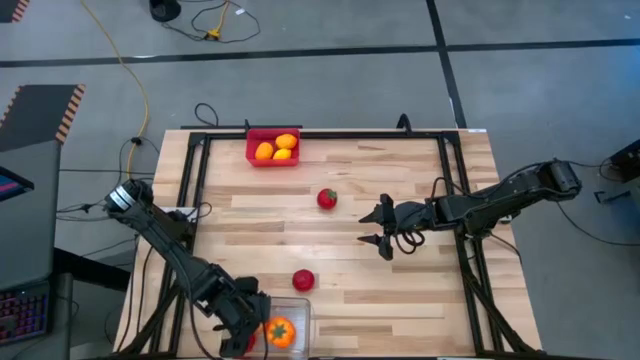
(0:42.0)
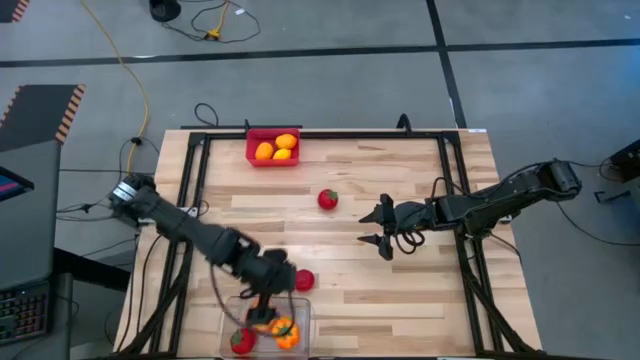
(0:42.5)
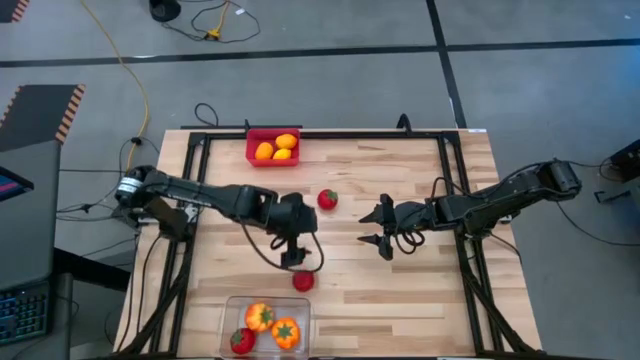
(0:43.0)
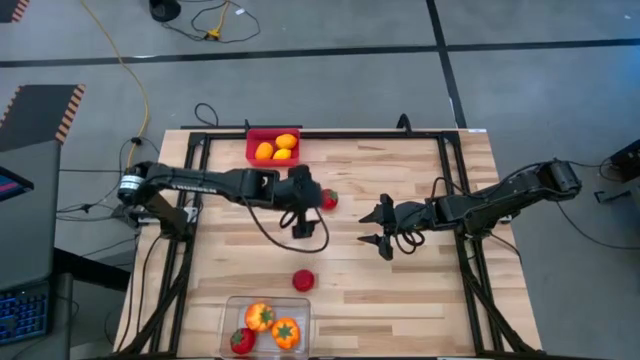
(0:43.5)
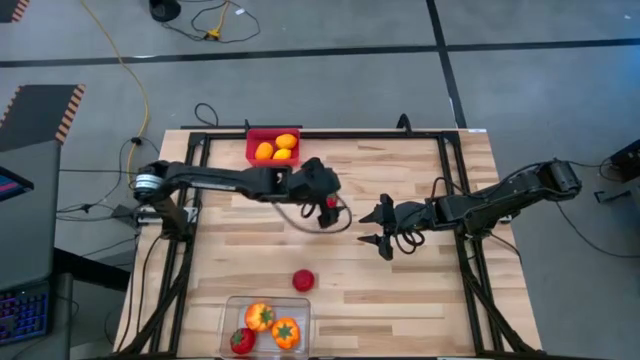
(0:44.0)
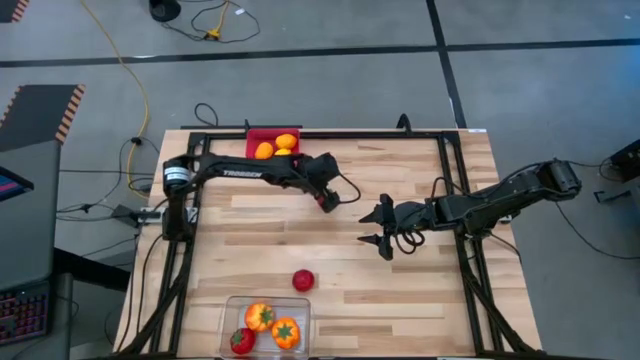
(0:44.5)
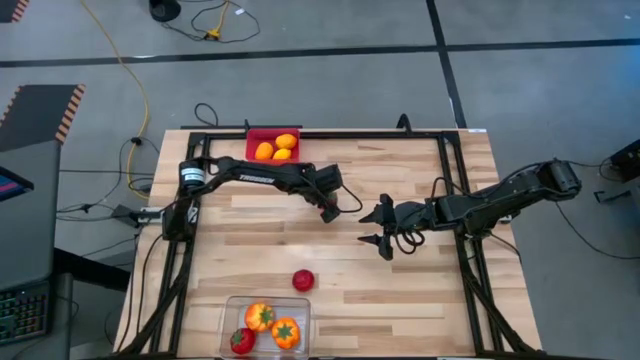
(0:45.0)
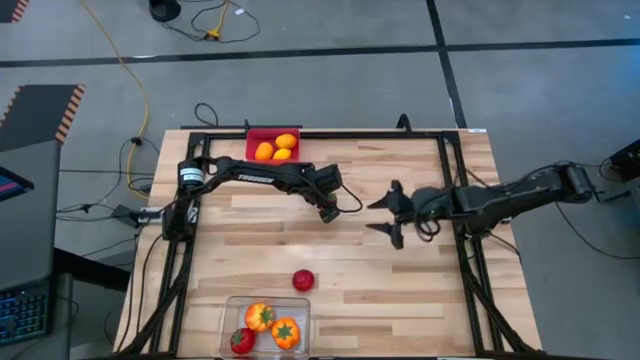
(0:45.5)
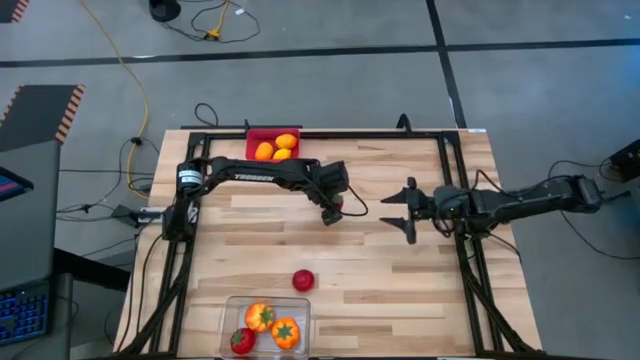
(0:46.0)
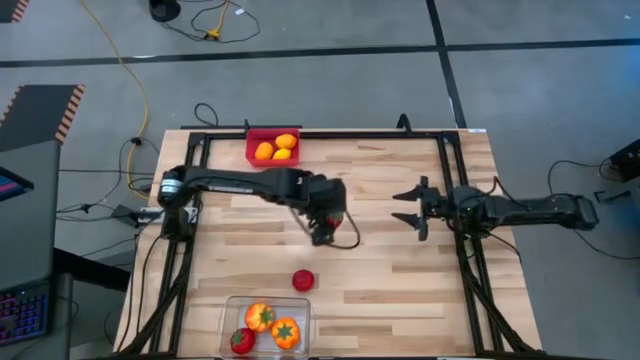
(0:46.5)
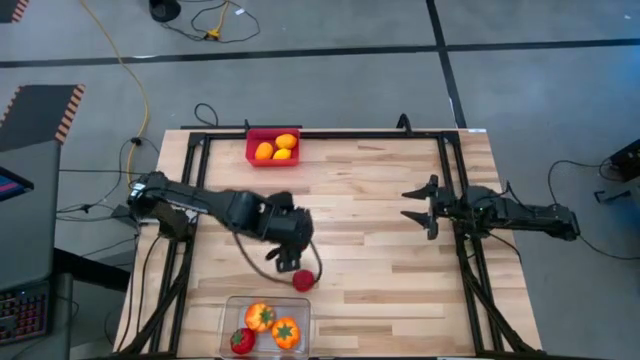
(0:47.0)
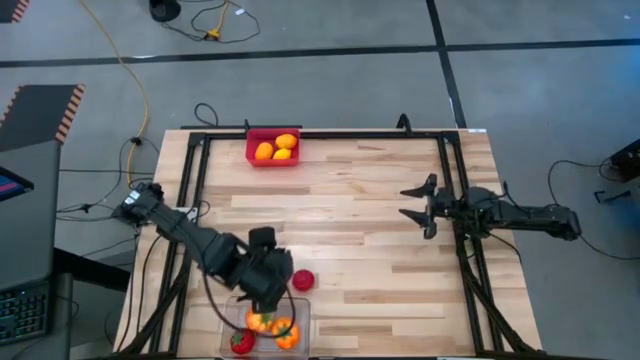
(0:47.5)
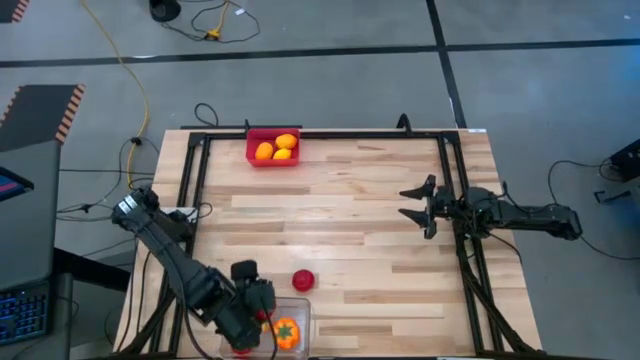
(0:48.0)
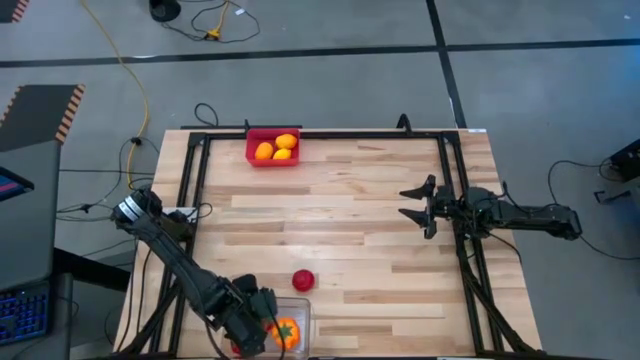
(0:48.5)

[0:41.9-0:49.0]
Task: Sort produce into baskets
Put the top red tomato into the transparent bin

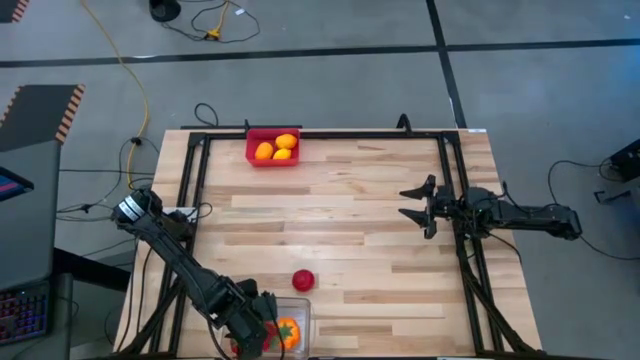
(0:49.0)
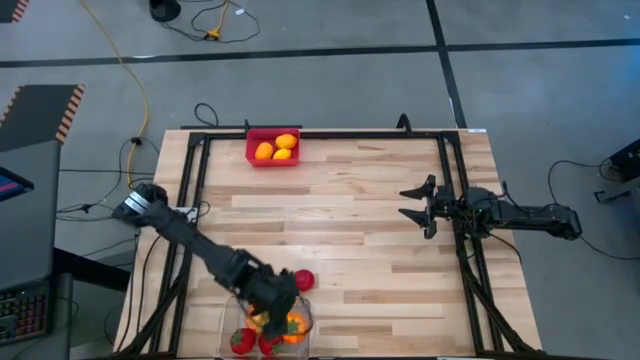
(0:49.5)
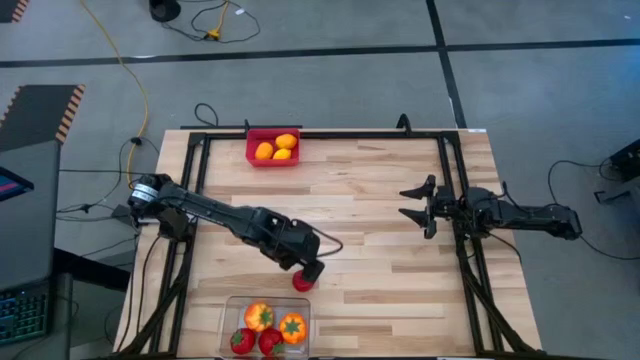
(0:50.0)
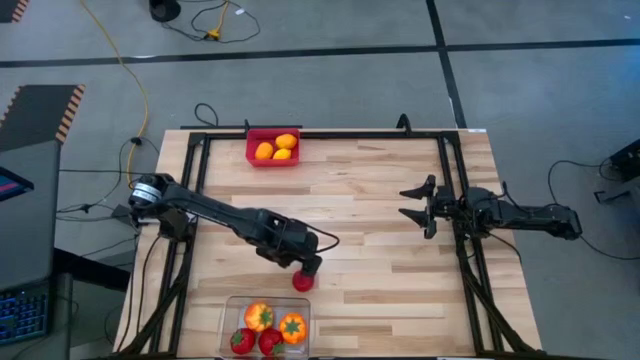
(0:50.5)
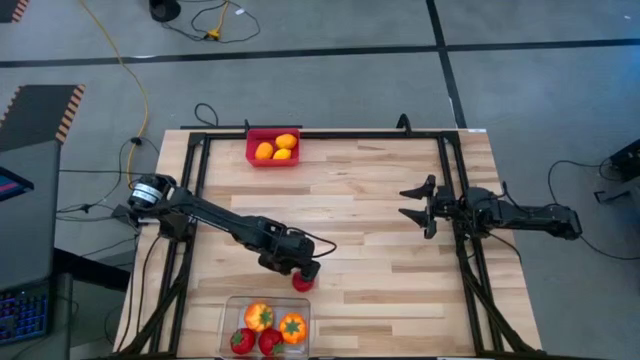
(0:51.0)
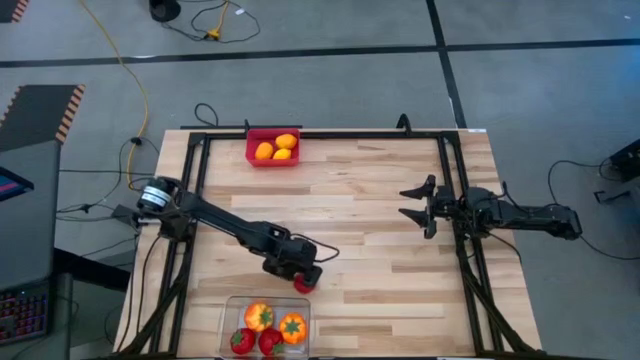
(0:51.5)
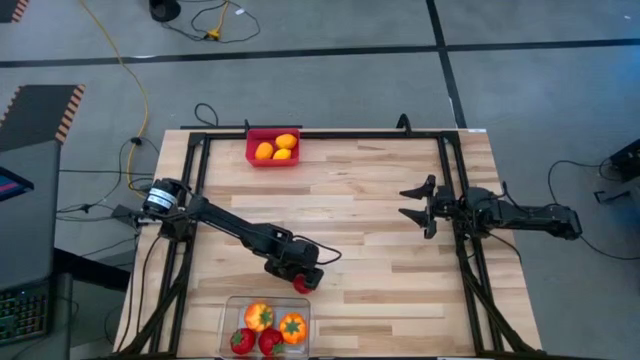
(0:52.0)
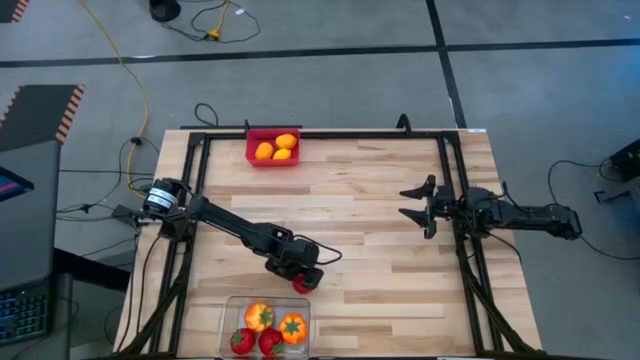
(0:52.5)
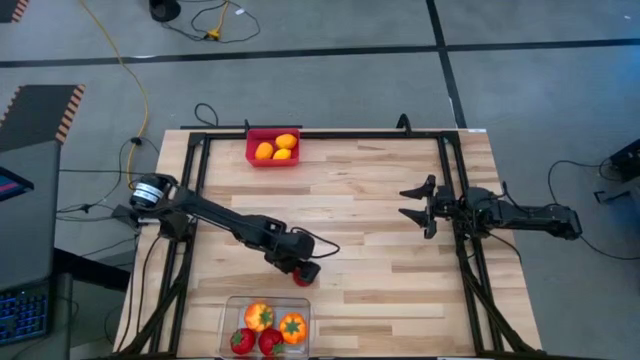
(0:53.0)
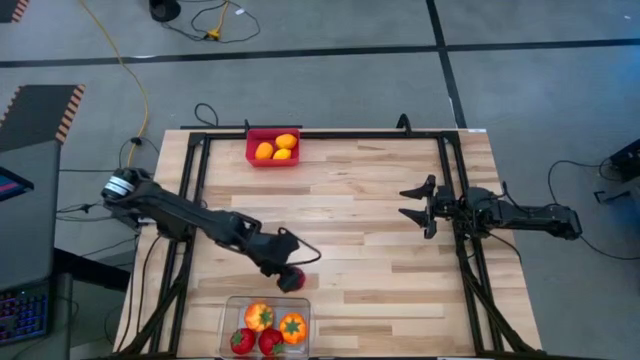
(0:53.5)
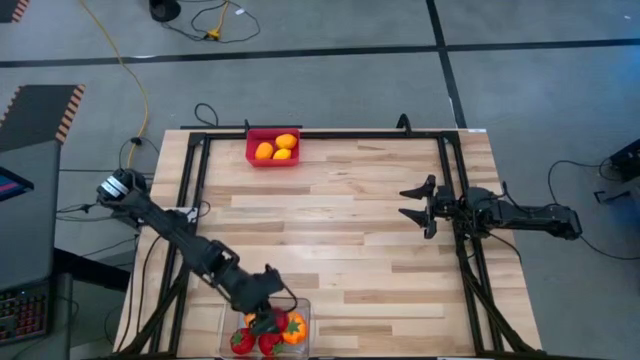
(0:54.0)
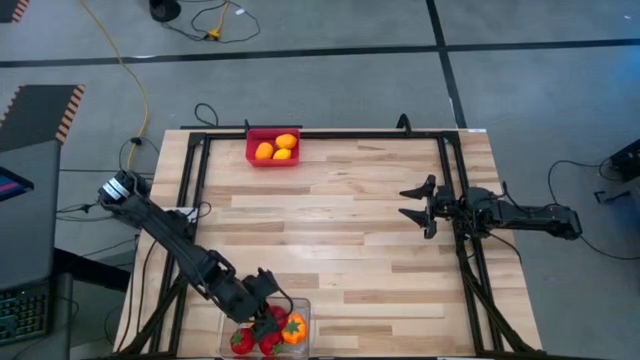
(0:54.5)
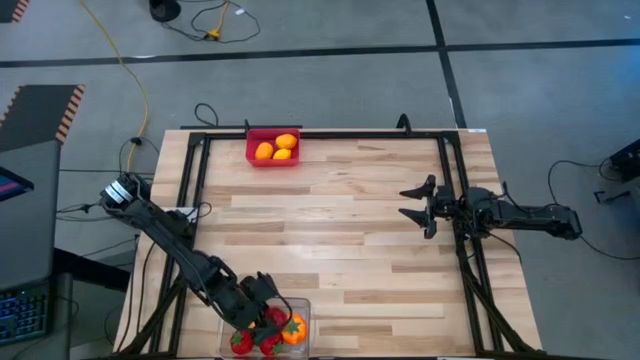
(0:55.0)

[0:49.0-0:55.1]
Put the red tomato into the transparent bin

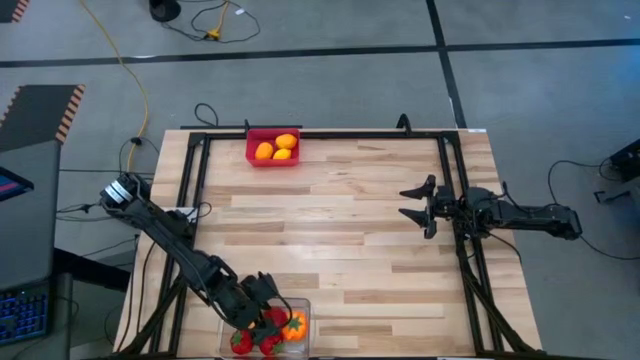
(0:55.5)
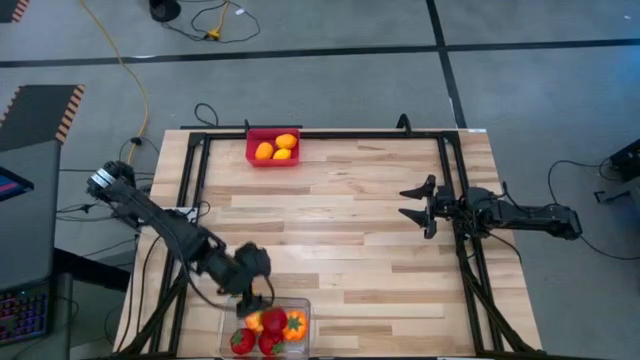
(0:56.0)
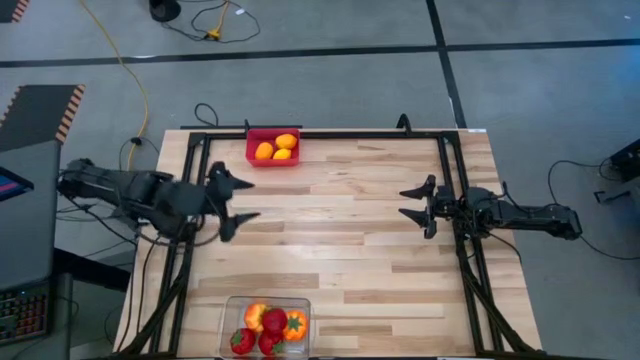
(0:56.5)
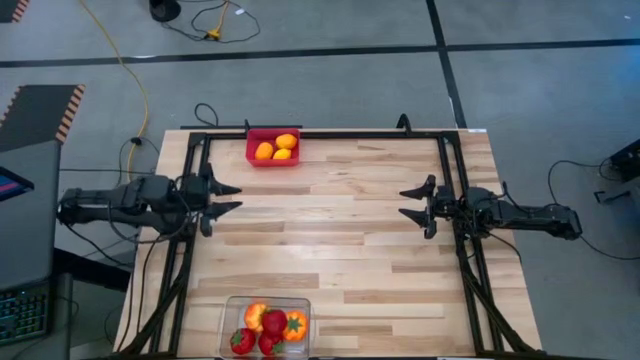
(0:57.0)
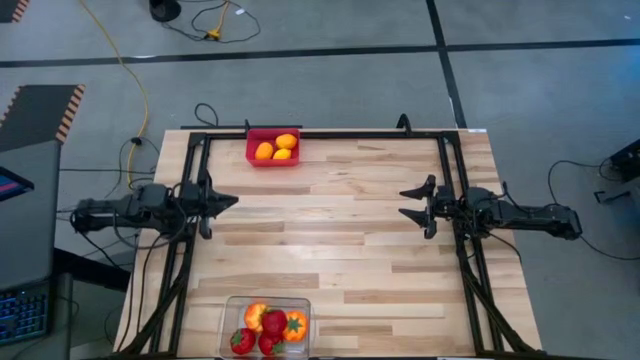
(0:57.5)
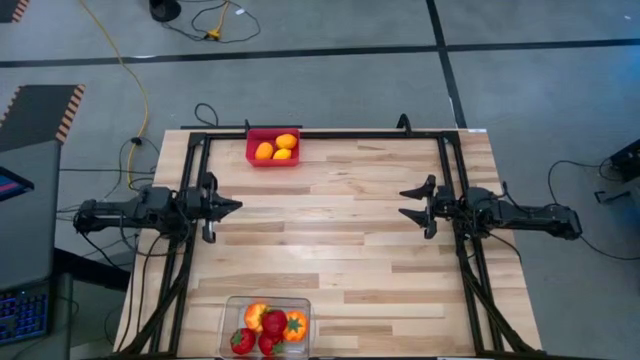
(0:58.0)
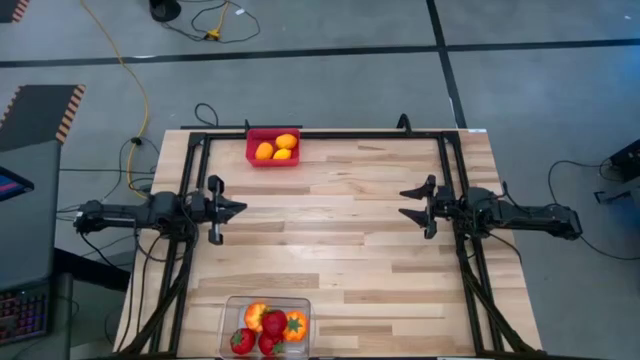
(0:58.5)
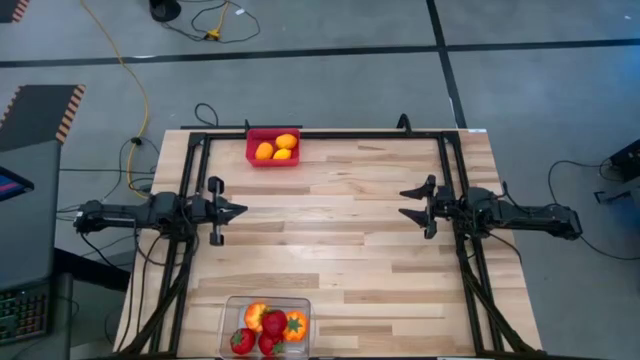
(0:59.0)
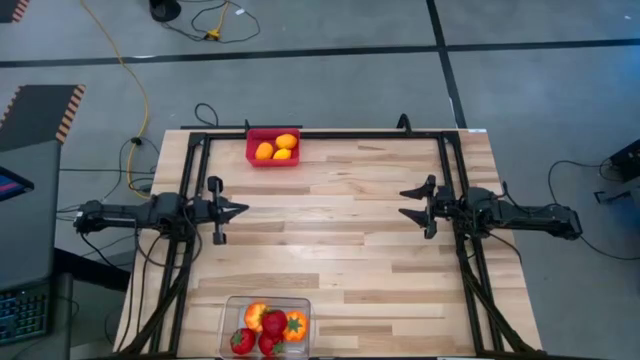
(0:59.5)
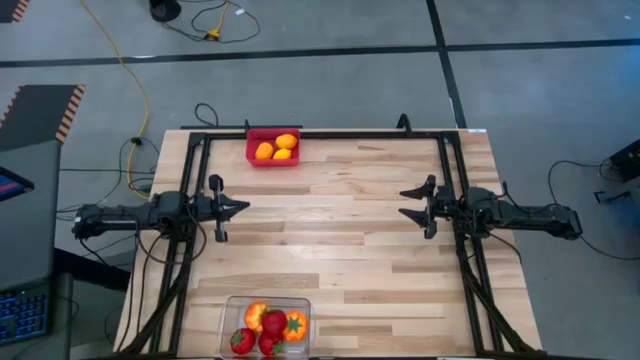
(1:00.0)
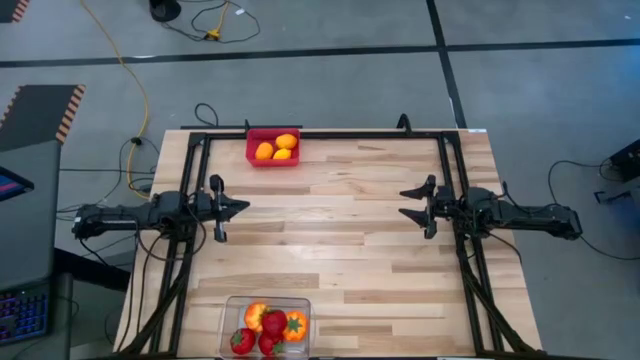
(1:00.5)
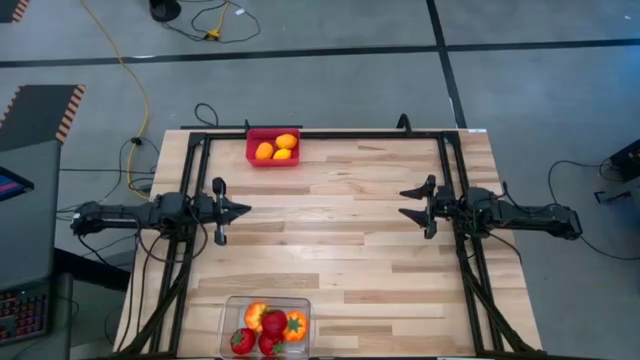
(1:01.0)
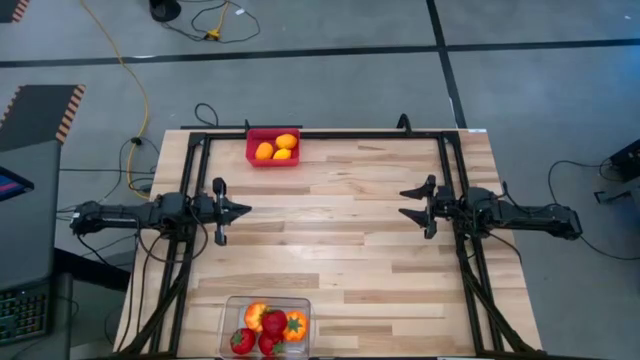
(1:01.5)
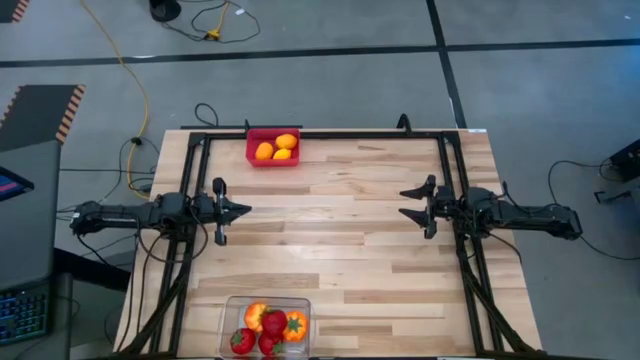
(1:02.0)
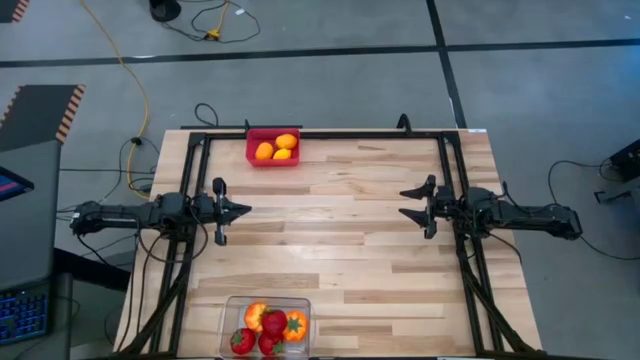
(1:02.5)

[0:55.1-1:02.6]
Return to Home Position
